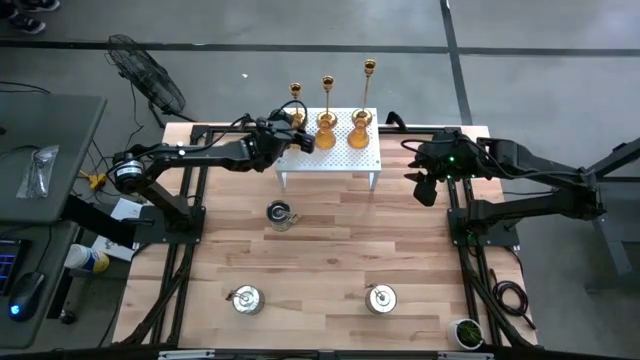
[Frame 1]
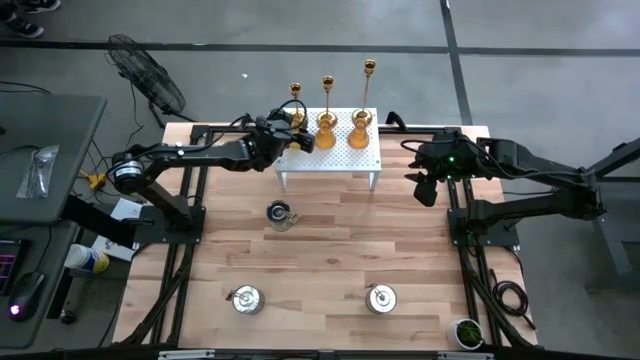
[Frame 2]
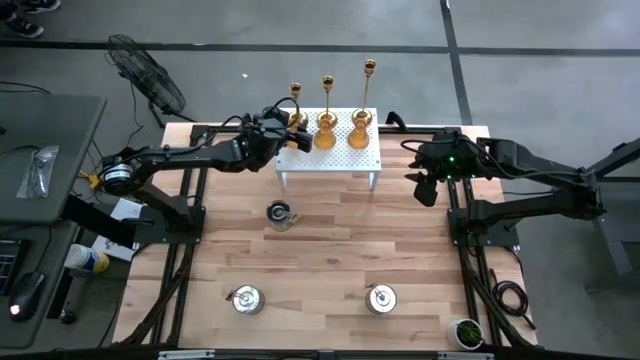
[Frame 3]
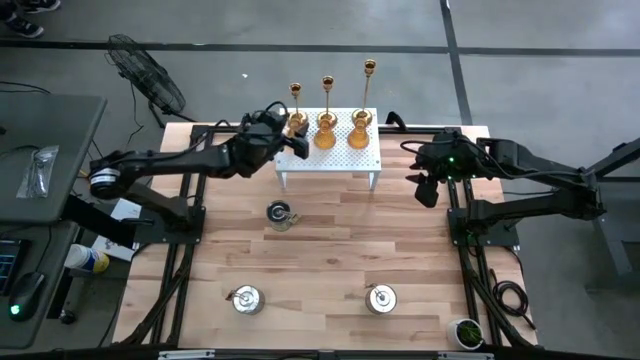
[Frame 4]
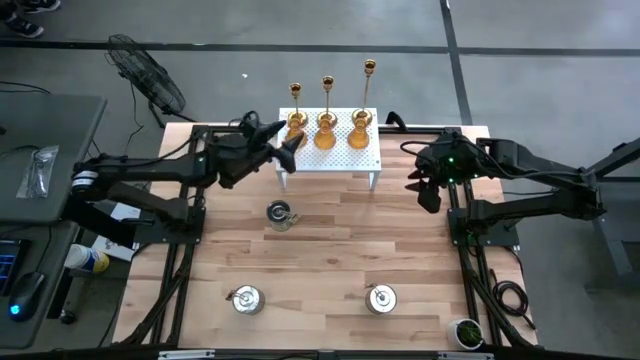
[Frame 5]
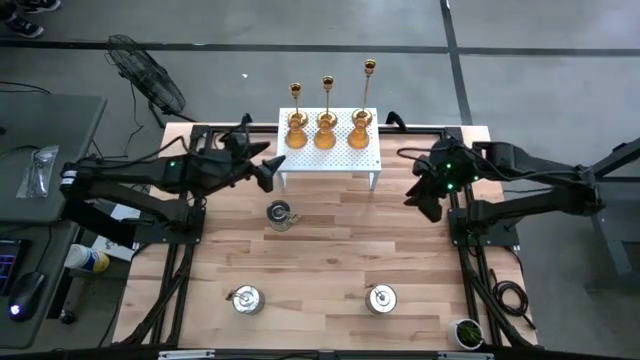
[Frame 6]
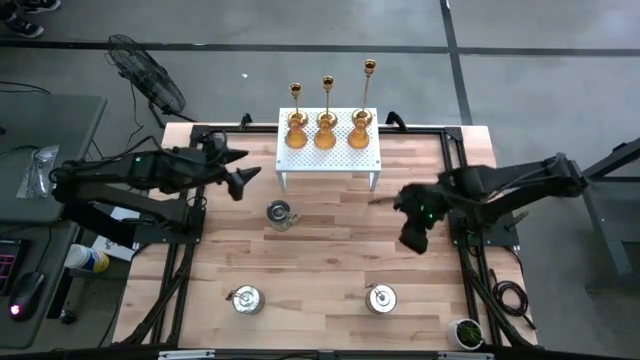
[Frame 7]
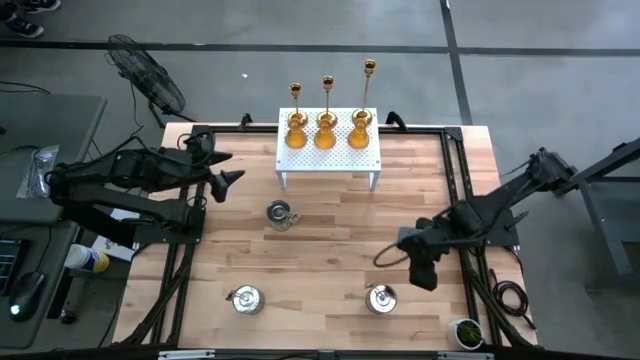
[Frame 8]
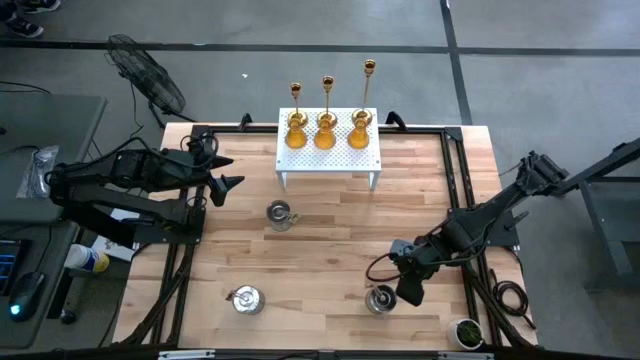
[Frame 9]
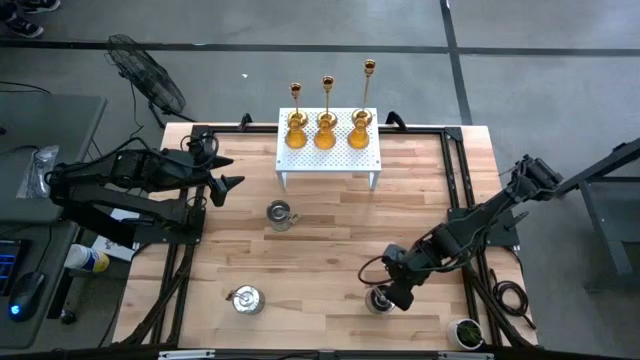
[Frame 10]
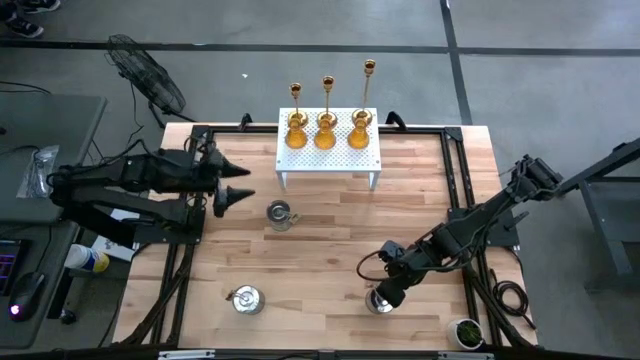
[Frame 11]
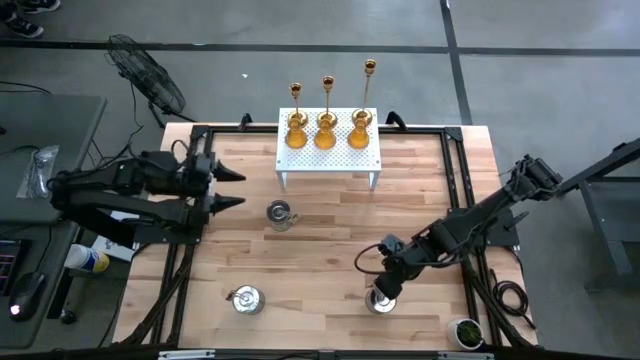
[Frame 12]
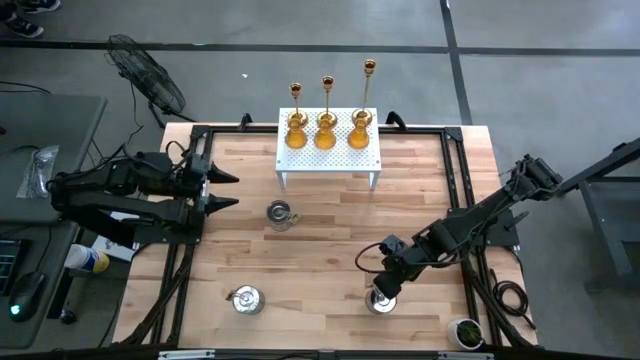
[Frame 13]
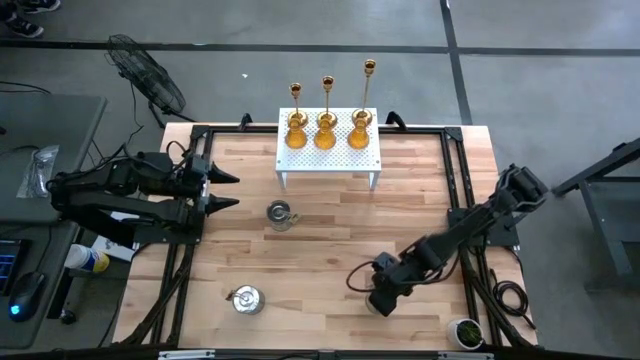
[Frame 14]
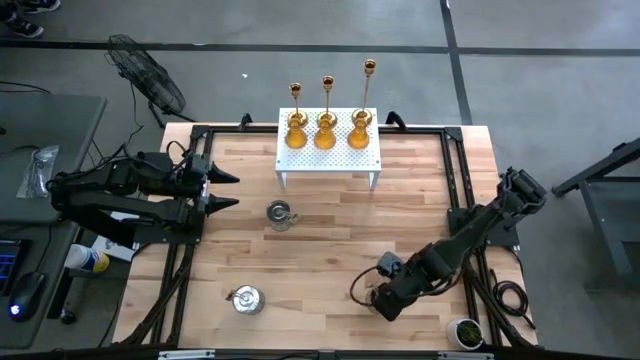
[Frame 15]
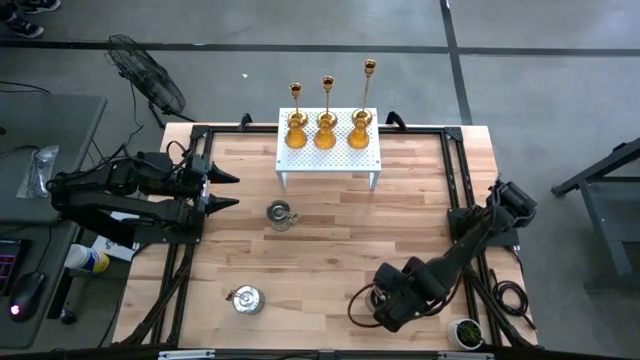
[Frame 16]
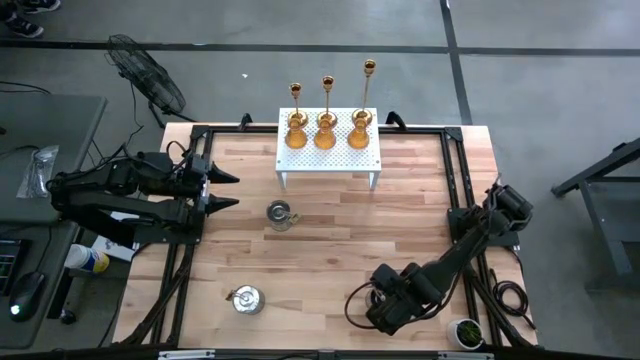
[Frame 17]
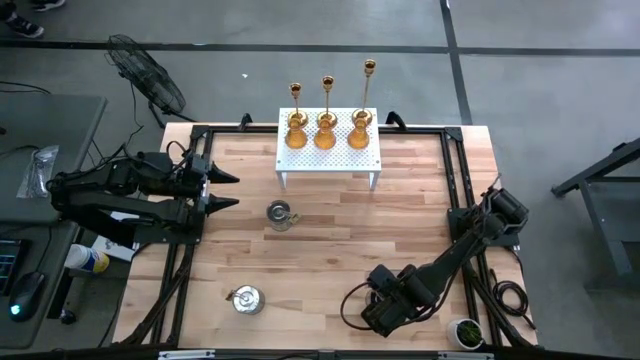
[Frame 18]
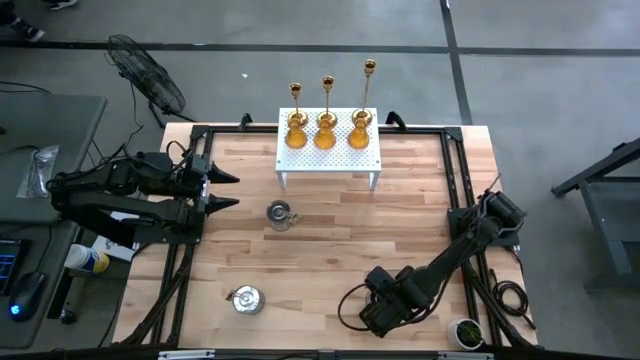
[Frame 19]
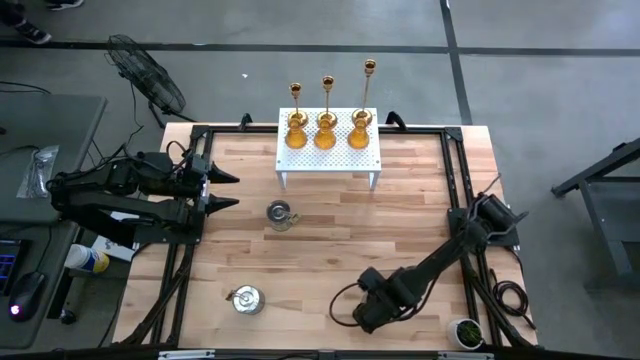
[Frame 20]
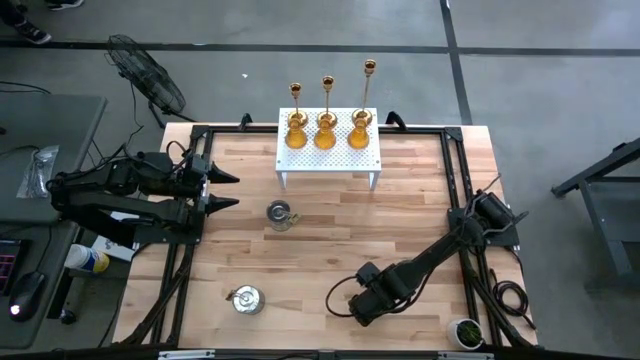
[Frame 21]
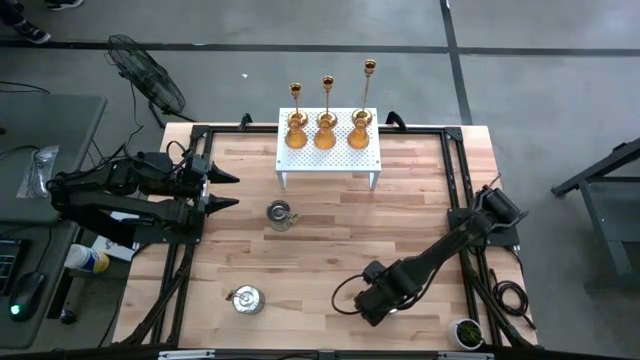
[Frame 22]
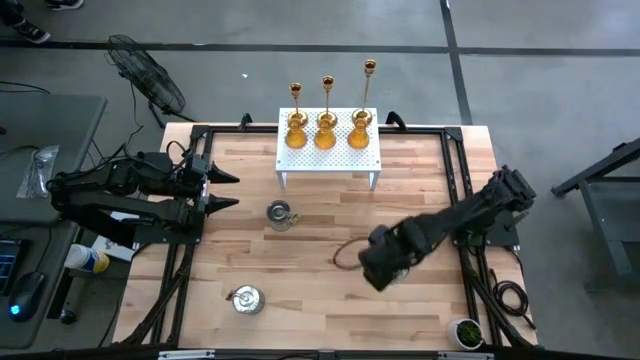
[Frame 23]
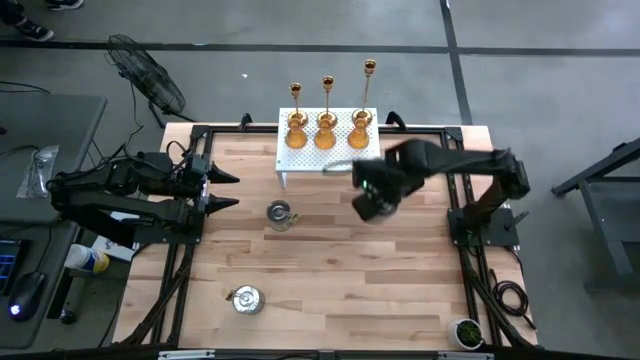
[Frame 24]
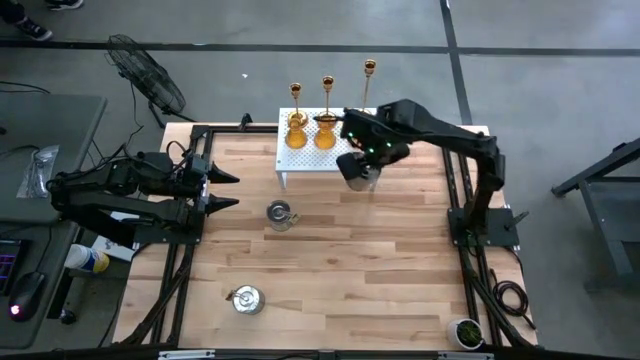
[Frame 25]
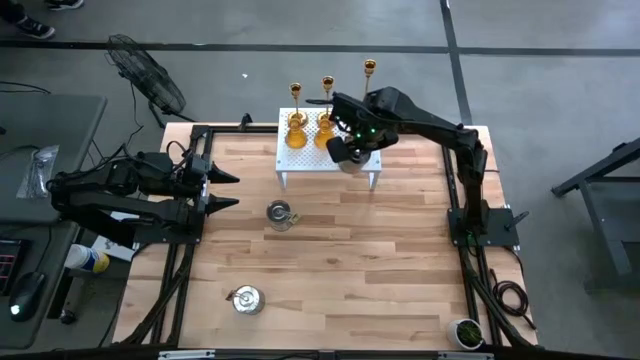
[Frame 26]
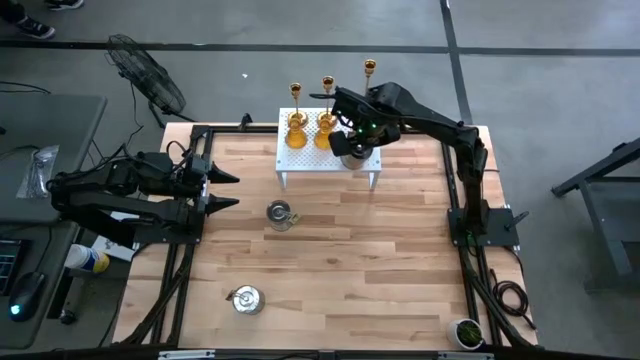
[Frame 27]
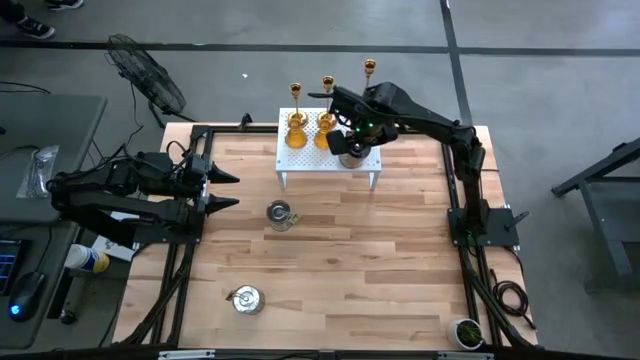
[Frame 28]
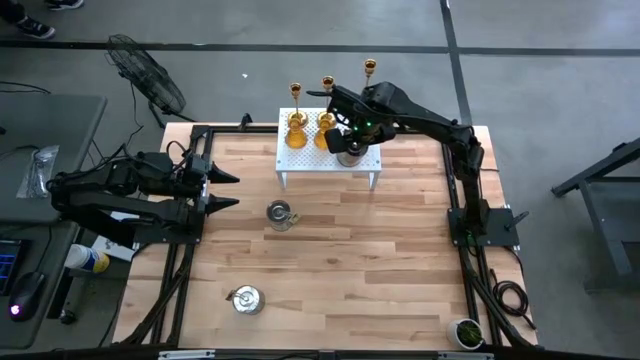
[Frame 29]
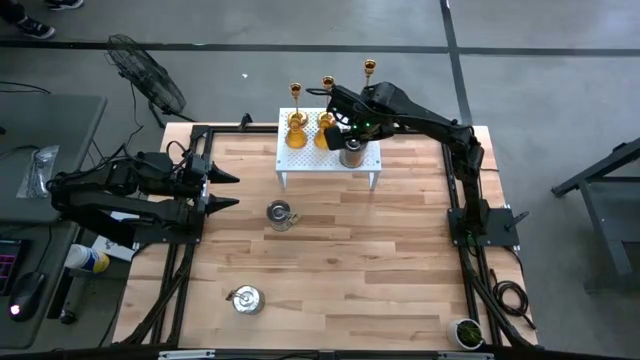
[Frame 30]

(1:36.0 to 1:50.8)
Task: Pick & Place candle stick holders
Put the right silver scented candle on the shelf

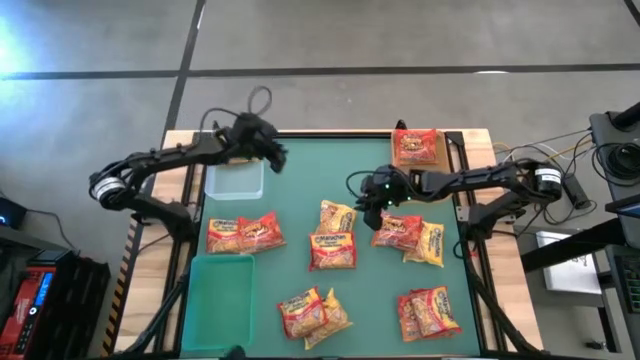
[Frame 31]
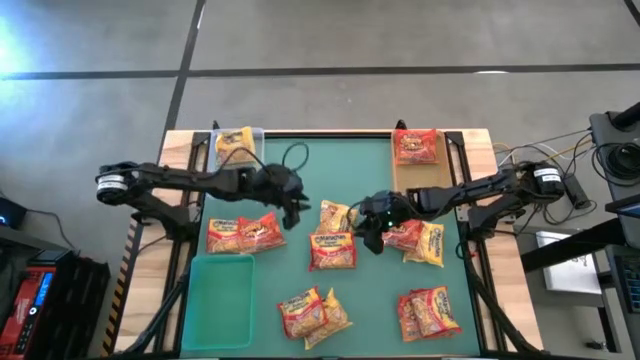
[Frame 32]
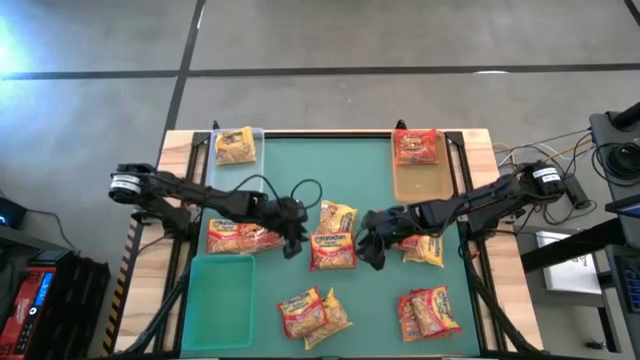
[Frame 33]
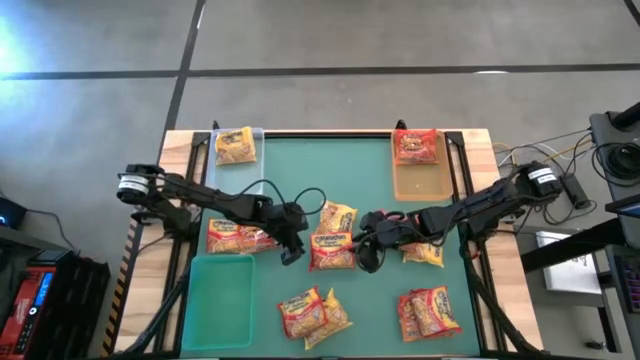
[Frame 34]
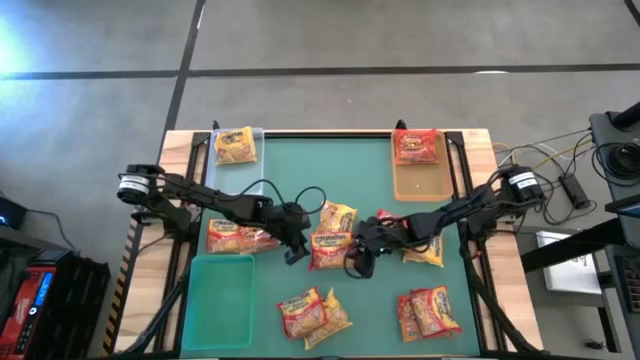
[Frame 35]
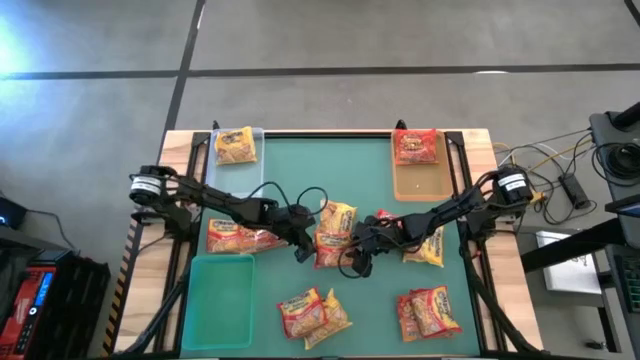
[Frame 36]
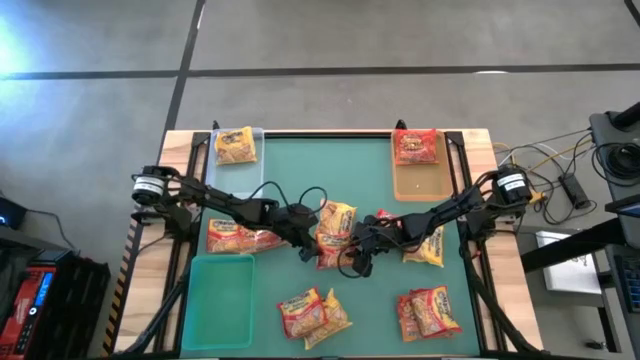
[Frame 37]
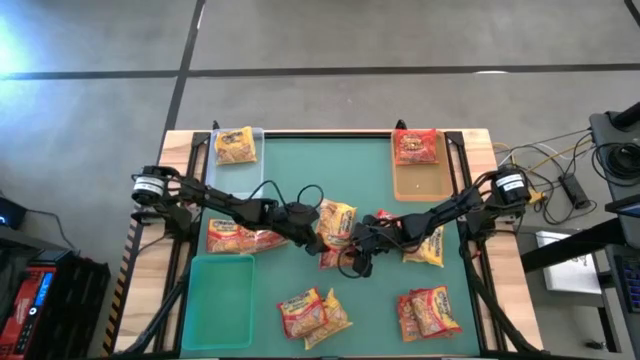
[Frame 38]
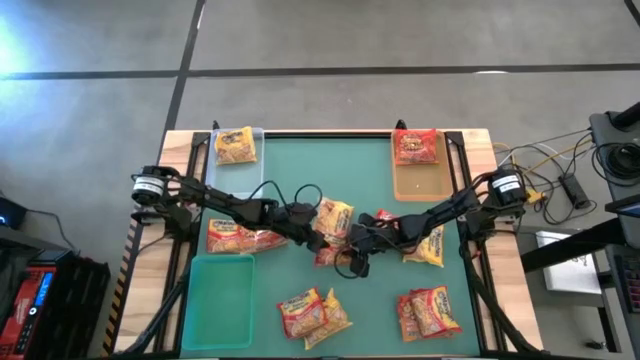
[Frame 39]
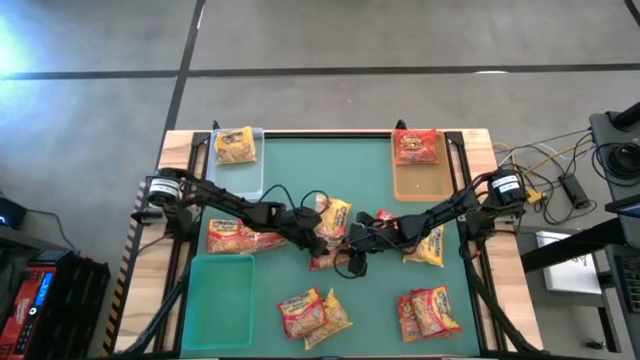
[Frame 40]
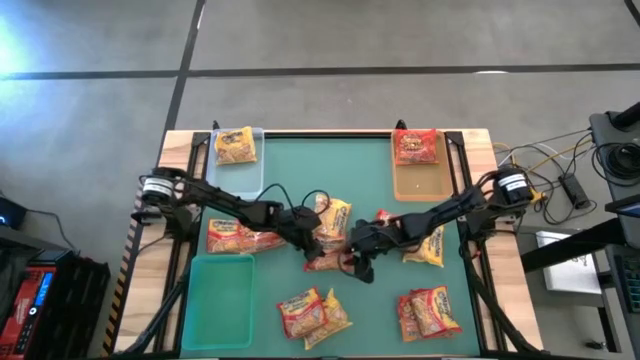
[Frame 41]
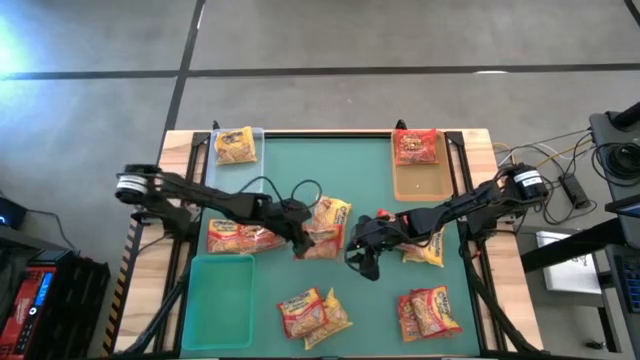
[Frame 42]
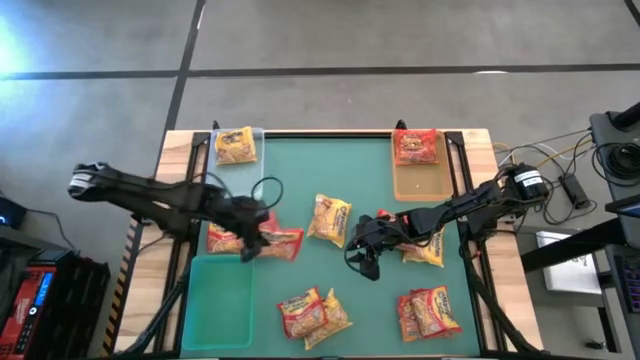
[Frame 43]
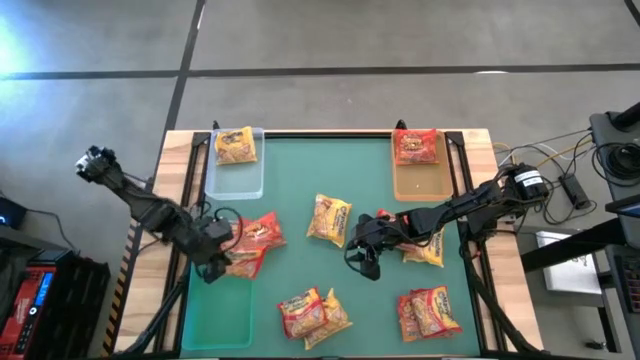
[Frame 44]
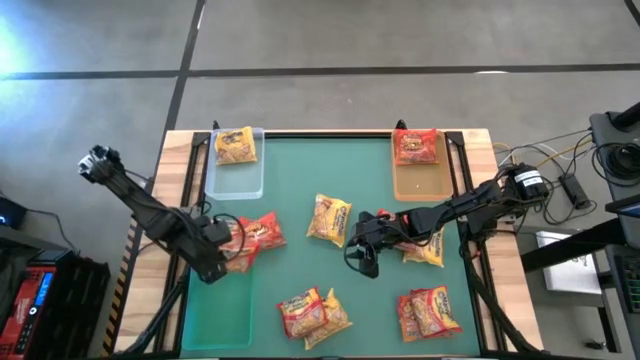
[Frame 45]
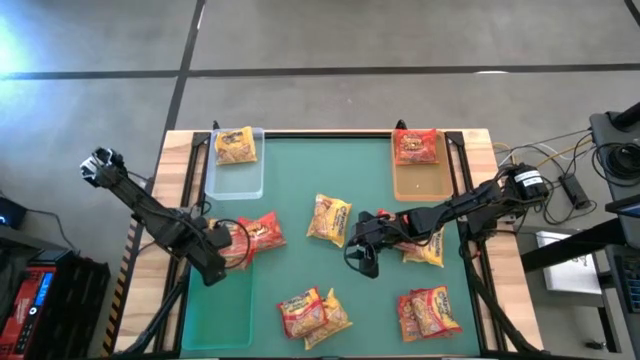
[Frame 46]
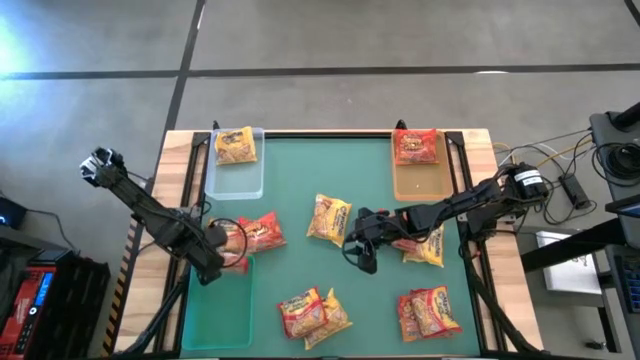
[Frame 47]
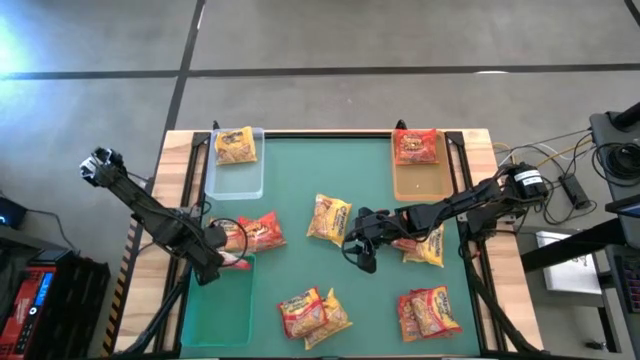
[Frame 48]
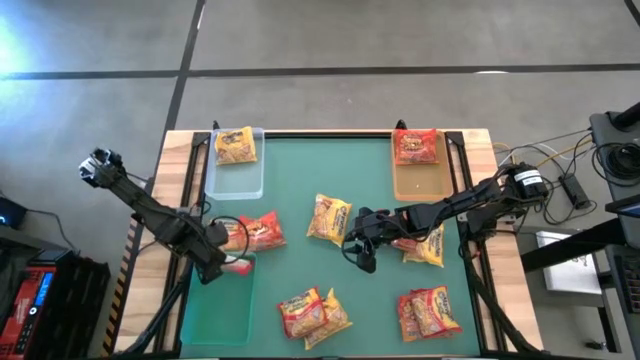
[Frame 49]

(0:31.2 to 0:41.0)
Task: Sort Maruchan noodles
Put the red noodle pack into the green bin
